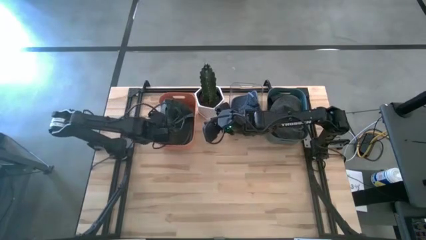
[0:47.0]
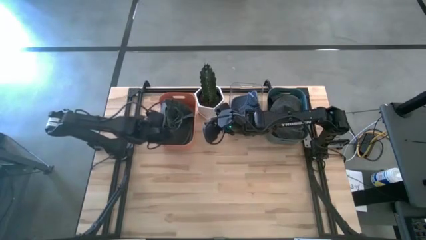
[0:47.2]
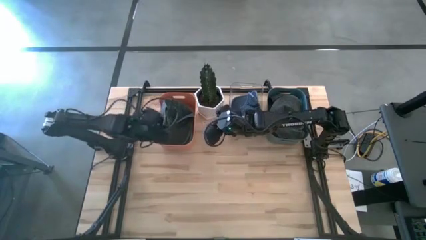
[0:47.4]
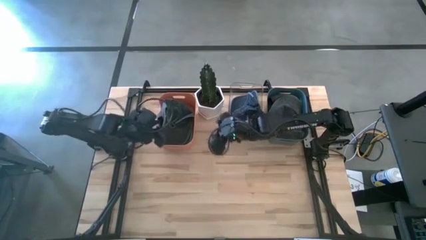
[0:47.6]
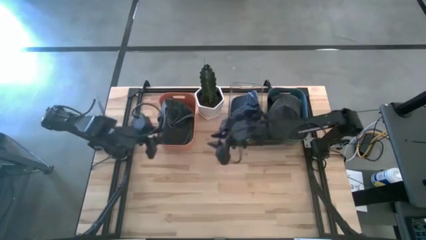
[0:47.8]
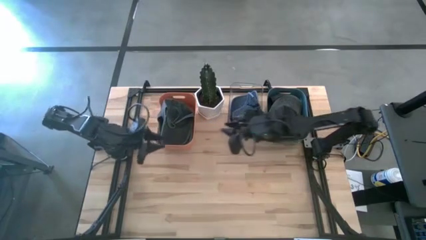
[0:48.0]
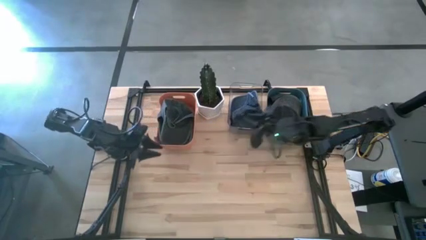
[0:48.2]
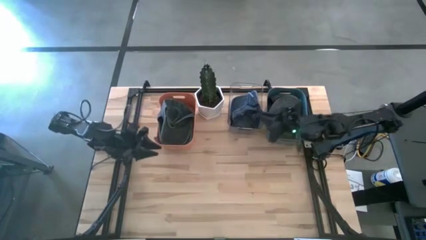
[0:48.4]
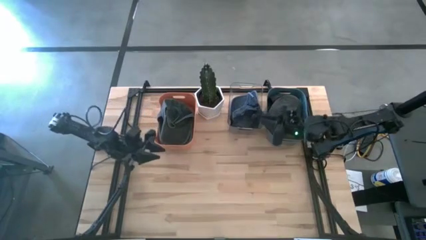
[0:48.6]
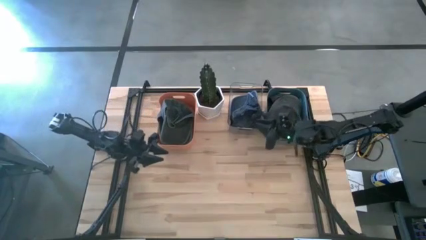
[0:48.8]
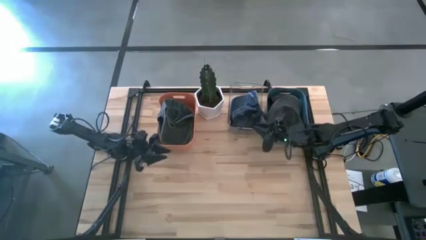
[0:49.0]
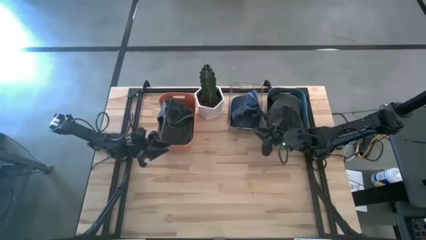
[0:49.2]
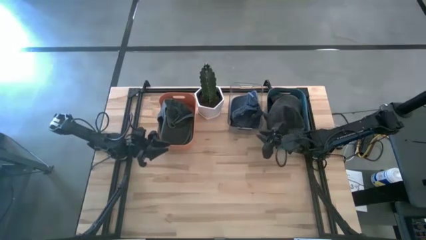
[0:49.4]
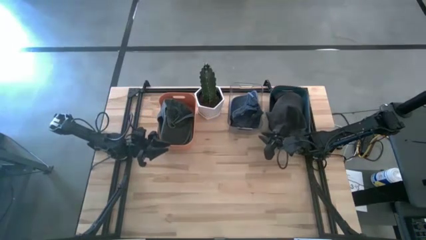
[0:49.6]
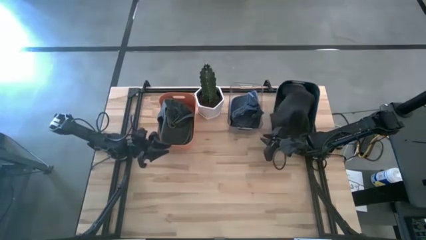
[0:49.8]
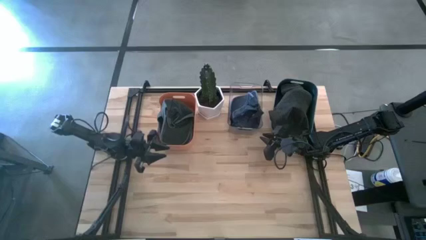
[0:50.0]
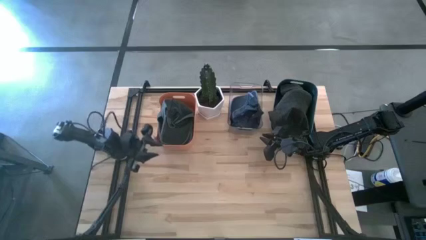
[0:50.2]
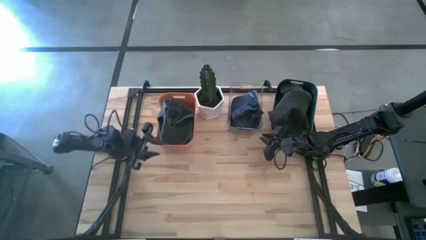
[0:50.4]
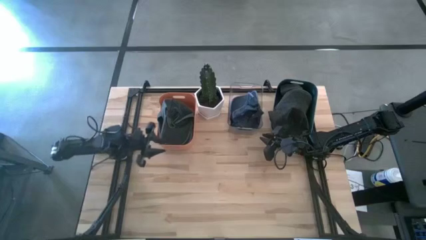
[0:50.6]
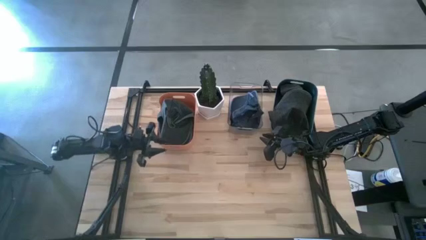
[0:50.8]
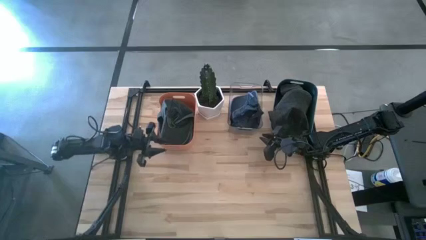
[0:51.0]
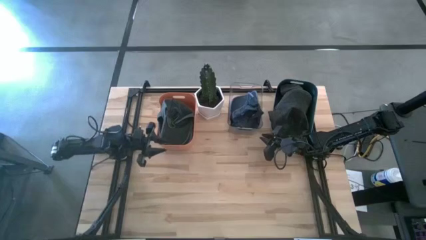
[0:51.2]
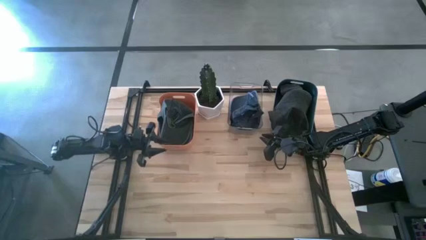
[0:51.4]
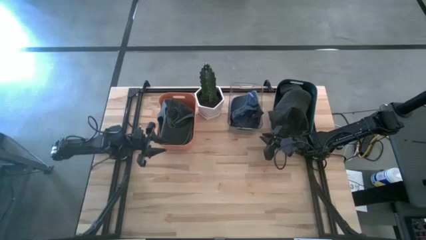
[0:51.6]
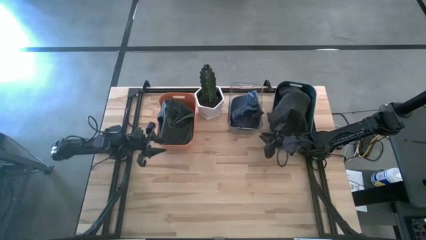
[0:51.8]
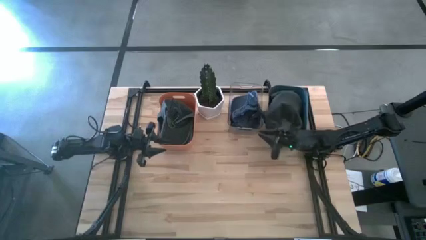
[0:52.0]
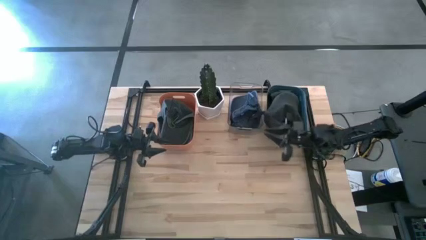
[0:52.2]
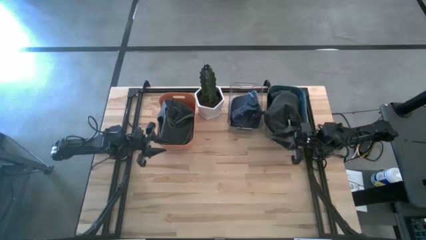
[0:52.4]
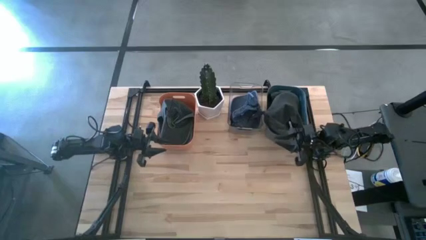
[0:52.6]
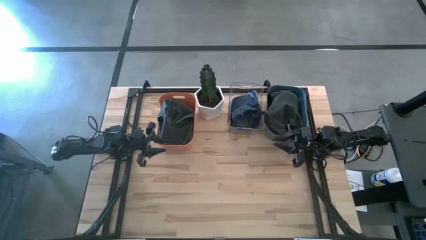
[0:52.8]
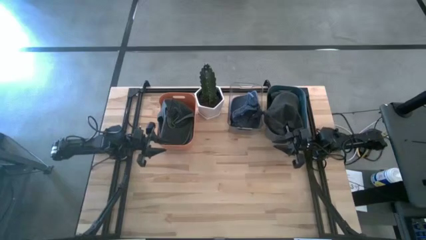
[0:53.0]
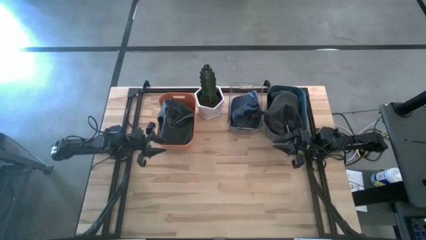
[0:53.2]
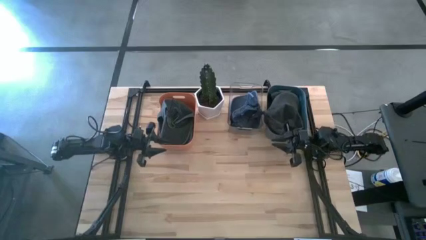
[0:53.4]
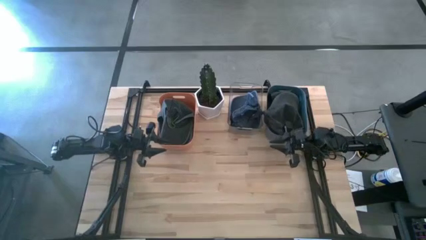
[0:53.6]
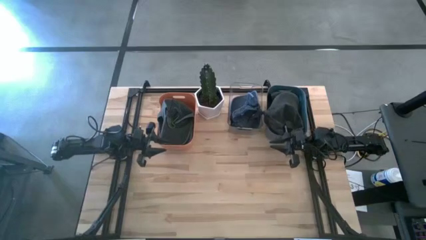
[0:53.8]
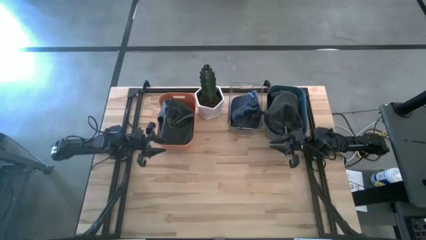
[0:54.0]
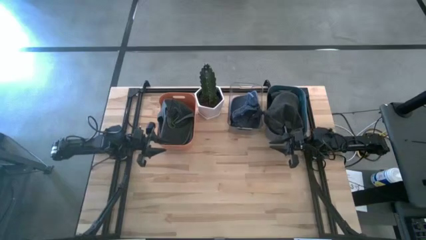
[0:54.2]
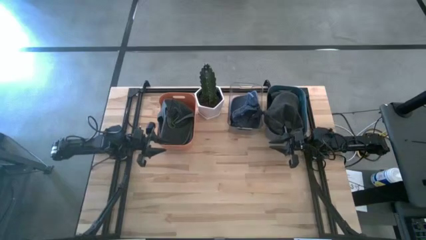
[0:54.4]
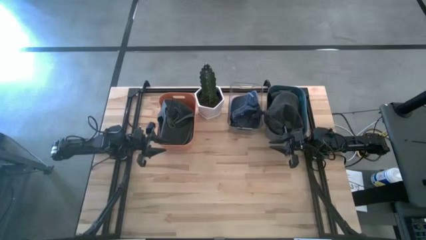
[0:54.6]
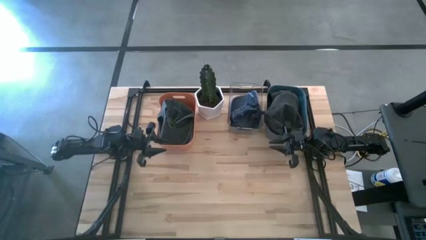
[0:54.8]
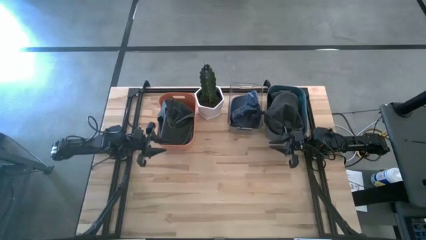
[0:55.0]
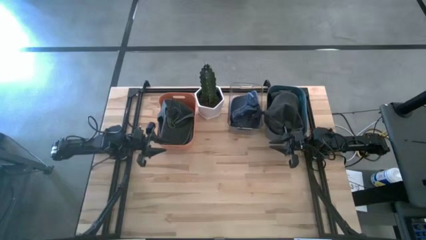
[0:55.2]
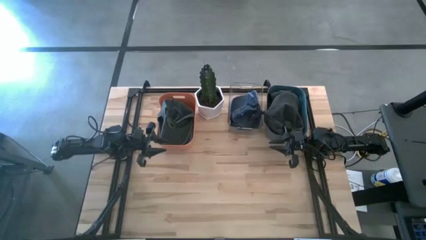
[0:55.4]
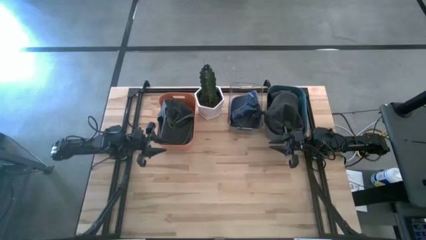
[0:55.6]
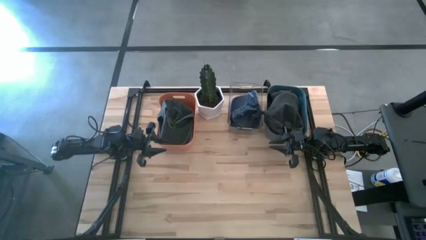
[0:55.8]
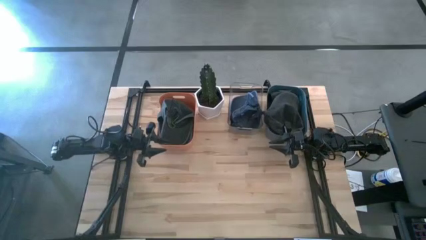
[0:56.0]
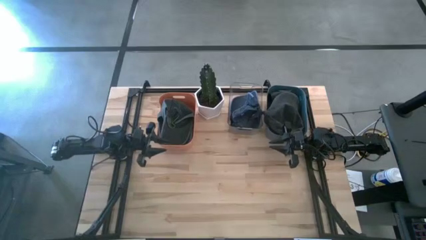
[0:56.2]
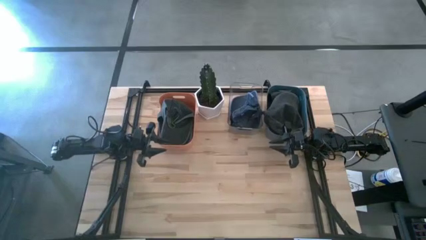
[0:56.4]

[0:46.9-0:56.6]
Task: Pick & Place hat
Return to Home Position

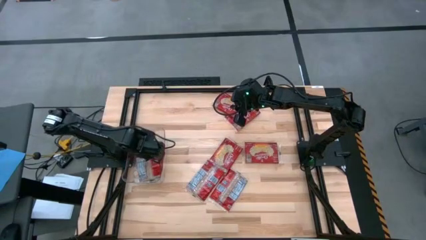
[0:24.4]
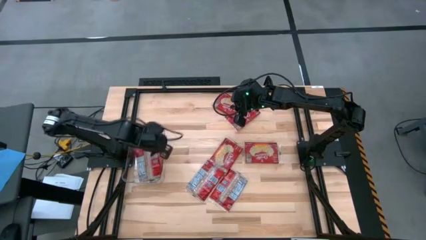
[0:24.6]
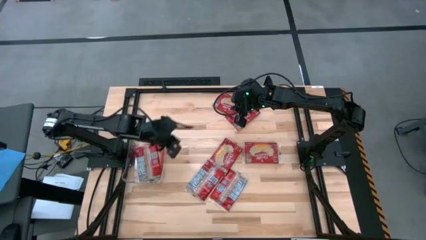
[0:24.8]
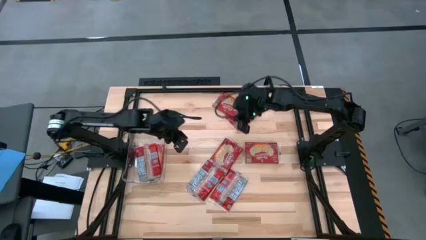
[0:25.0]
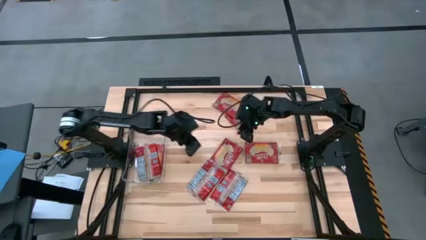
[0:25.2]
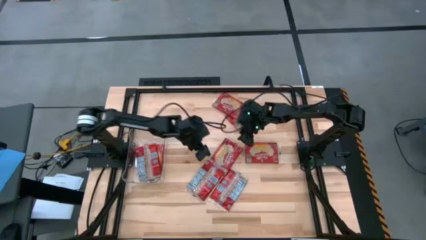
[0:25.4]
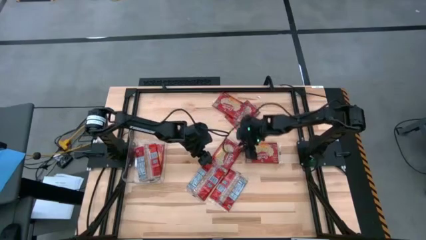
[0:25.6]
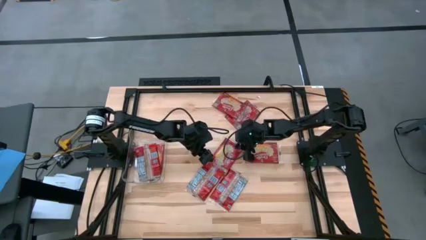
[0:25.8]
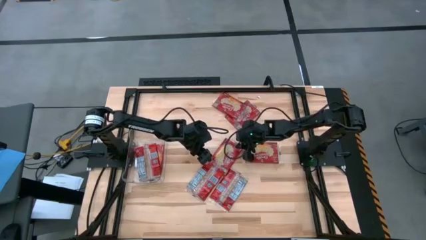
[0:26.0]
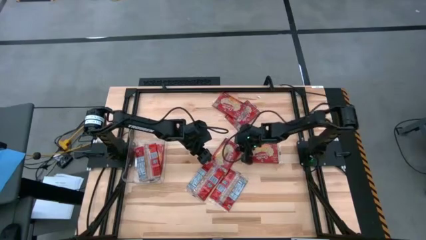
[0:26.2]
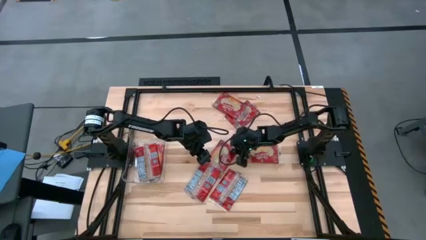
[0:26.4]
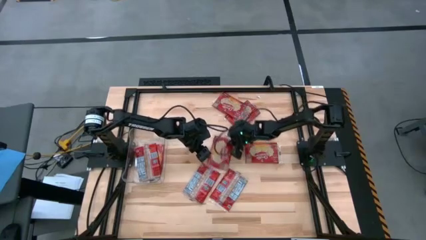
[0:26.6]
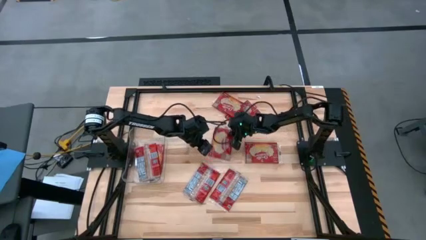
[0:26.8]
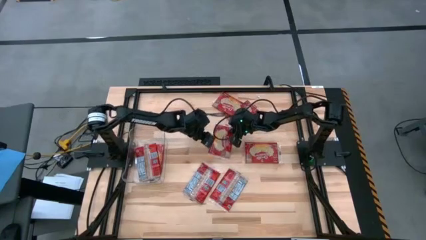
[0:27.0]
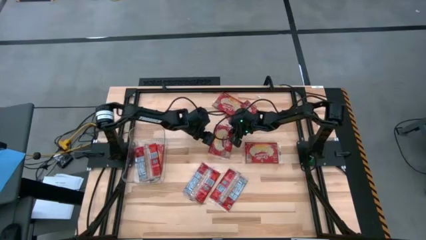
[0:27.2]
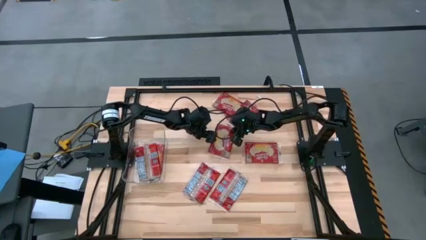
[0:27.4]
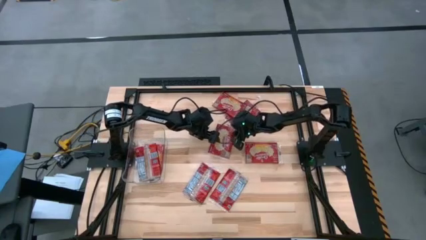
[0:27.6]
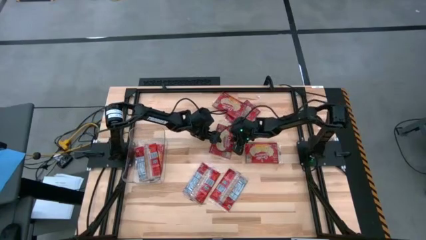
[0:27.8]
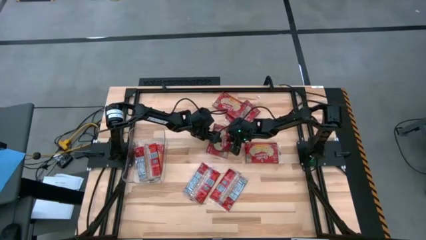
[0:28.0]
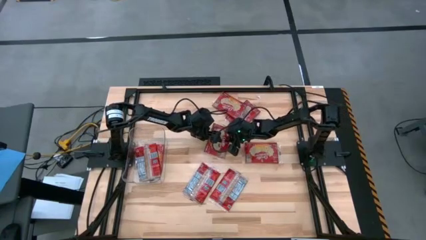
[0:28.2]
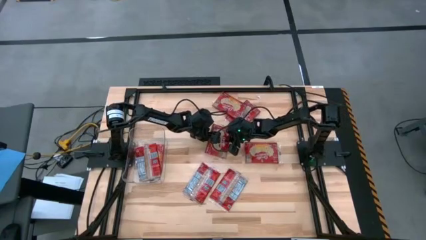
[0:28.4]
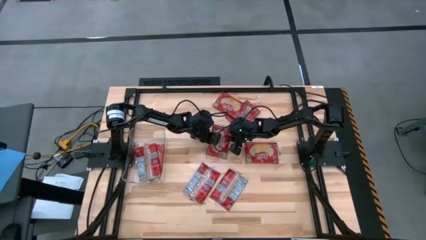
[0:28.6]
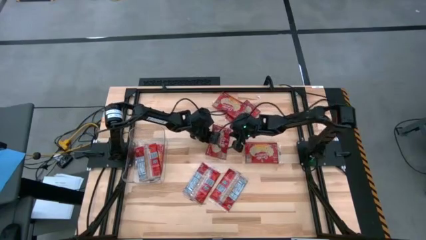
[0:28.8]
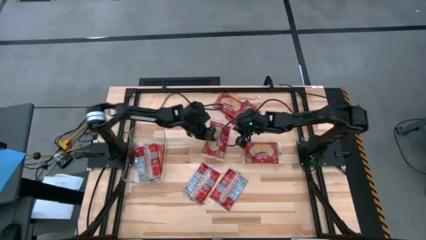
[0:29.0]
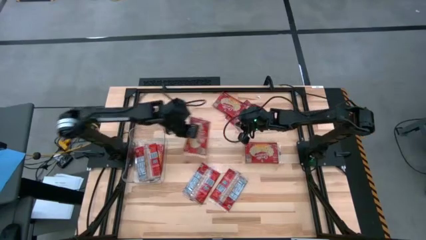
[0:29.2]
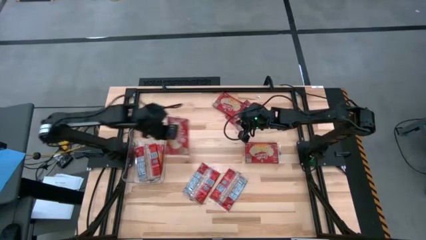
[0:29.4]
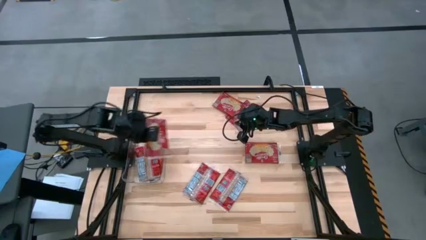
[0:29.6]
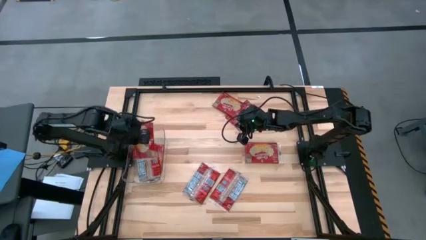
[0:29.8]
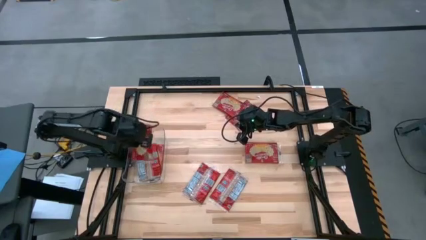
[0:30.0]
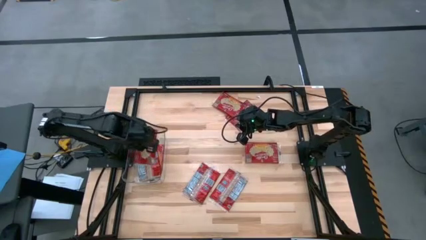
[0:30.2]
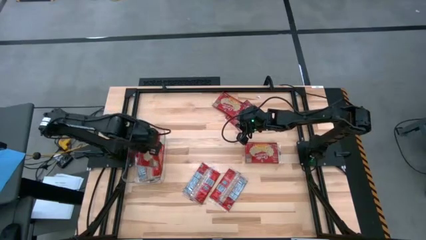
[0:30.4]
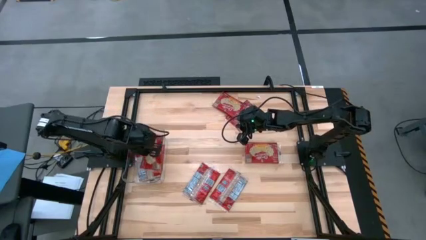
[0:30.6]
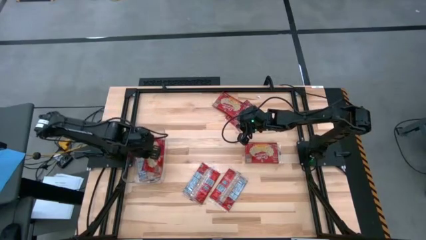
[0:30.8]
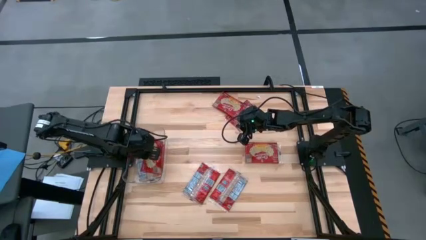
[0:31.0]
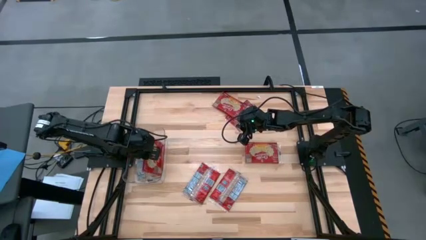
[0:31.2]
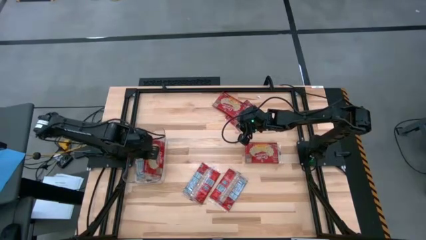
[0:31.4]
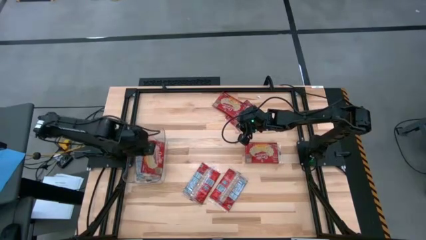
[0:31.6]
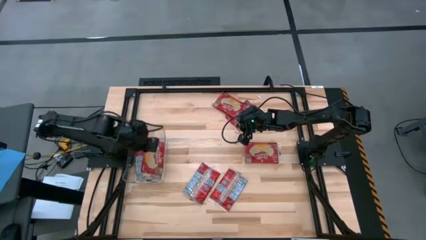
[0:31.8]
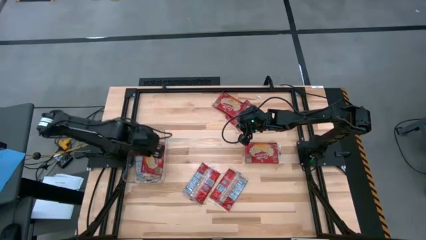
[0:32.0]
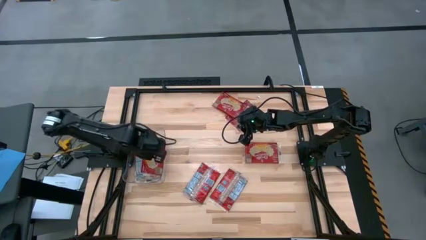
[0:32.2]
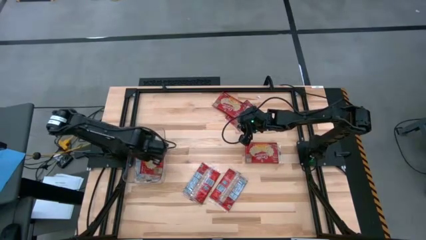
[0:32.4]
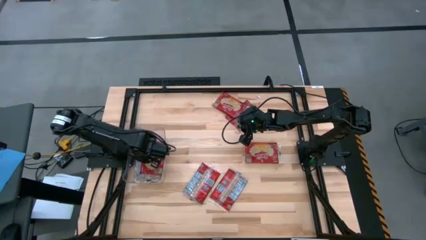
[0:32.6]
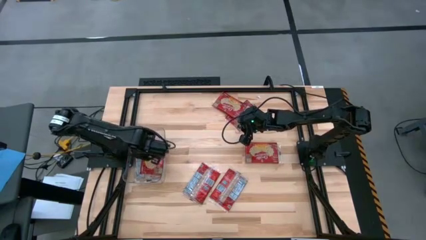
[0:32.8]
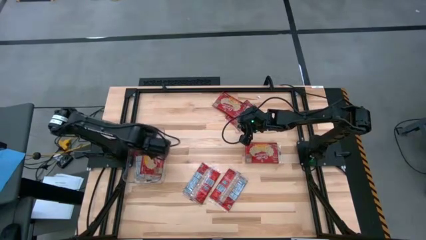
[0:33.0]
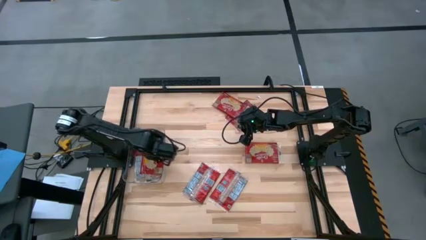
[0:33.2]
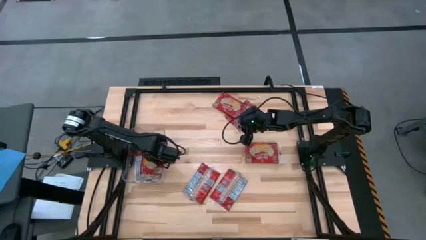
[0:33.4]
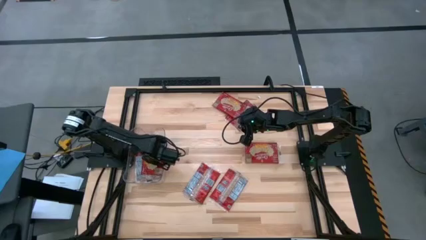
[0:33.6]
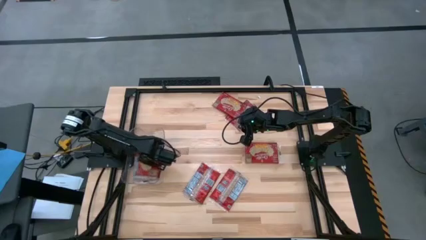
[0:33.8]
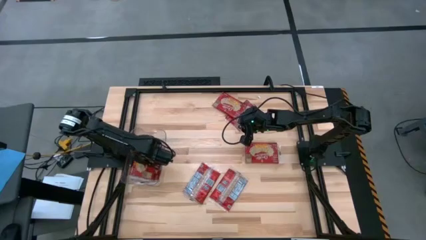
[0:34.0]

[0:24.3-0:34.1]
Task: Sort popcorn bags into baskets
Put the red popcorn bag into the transparent bin
